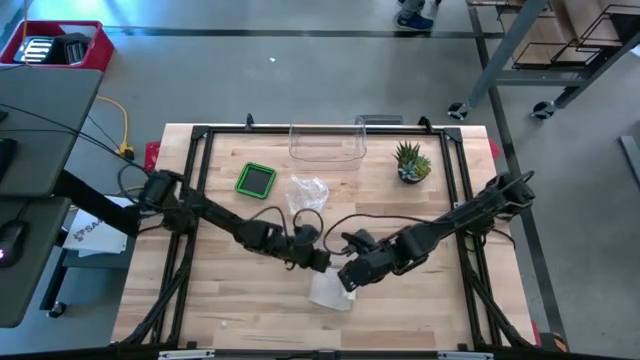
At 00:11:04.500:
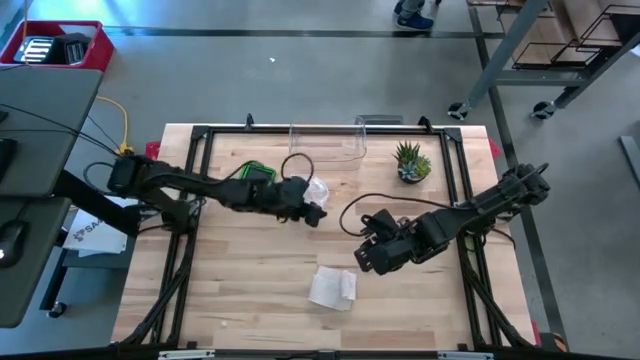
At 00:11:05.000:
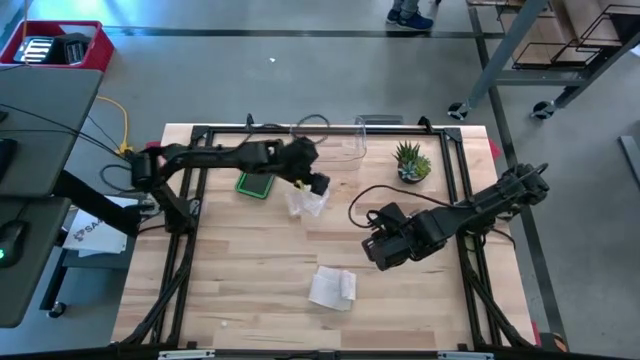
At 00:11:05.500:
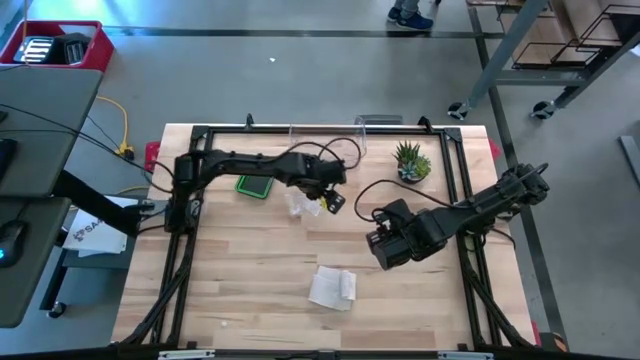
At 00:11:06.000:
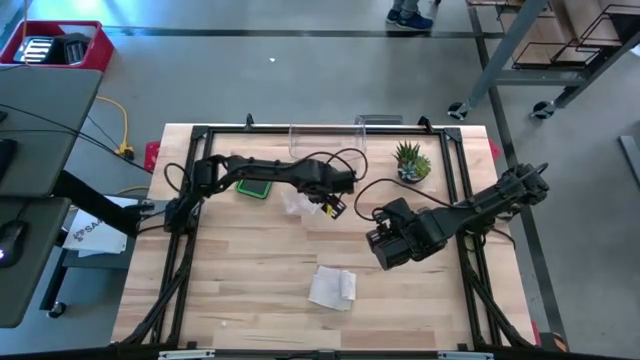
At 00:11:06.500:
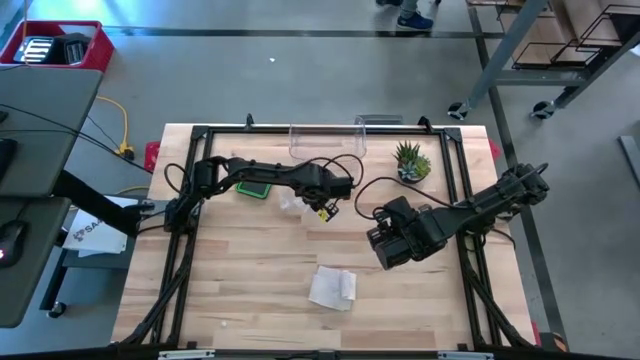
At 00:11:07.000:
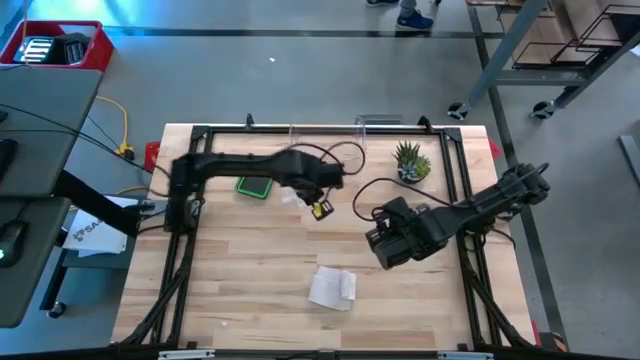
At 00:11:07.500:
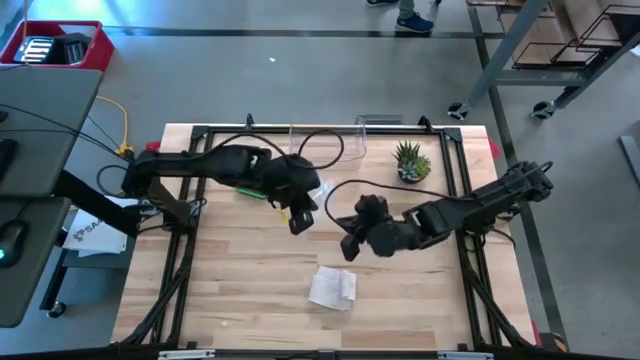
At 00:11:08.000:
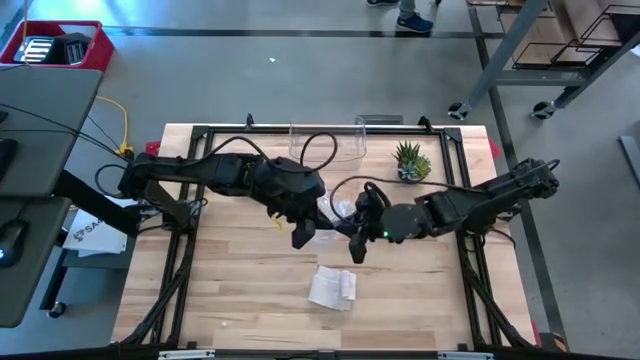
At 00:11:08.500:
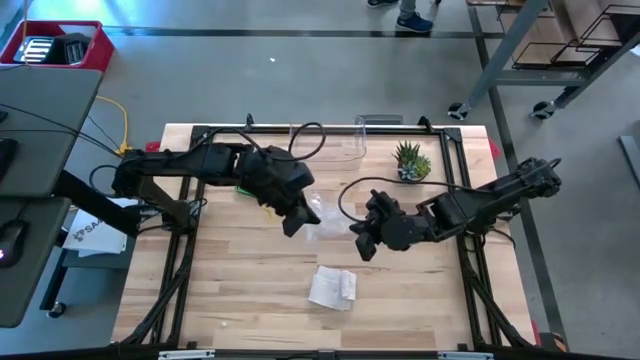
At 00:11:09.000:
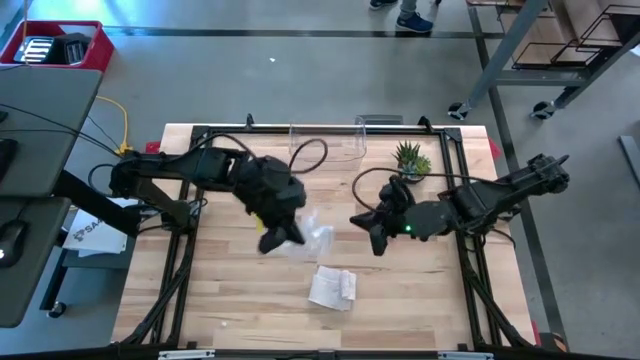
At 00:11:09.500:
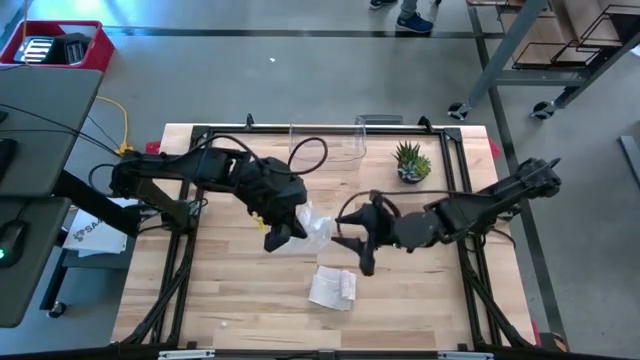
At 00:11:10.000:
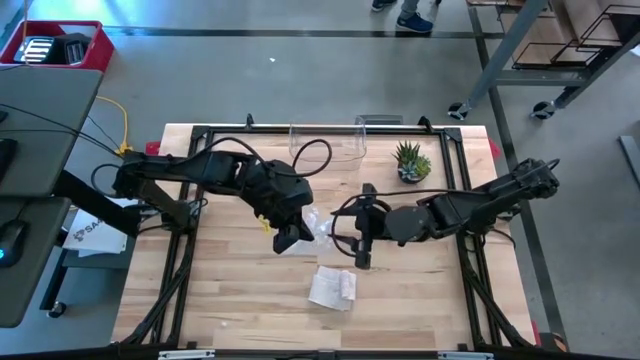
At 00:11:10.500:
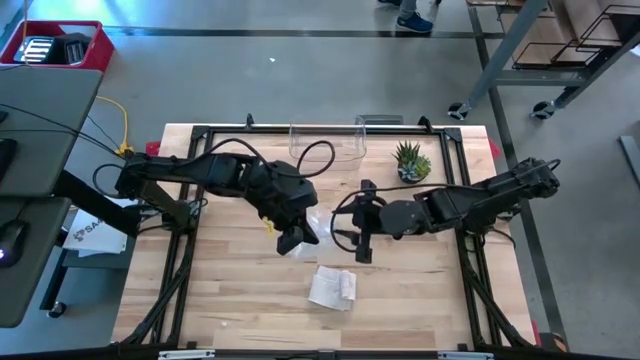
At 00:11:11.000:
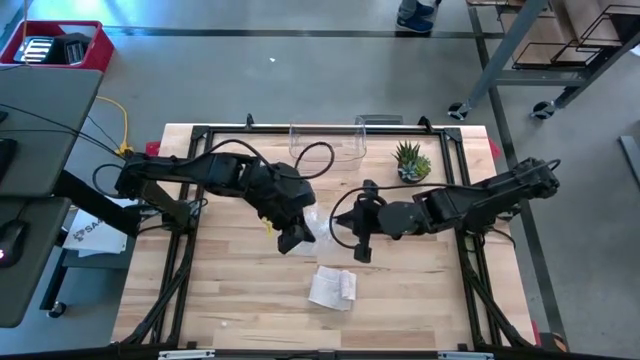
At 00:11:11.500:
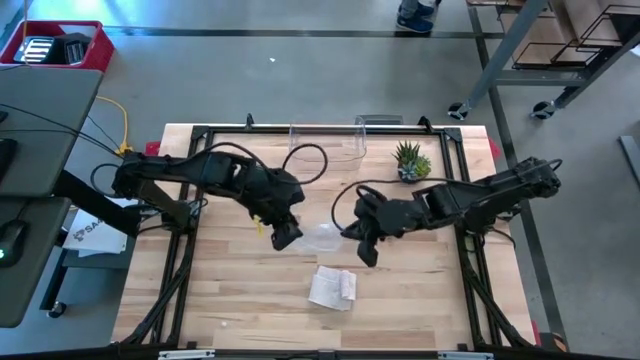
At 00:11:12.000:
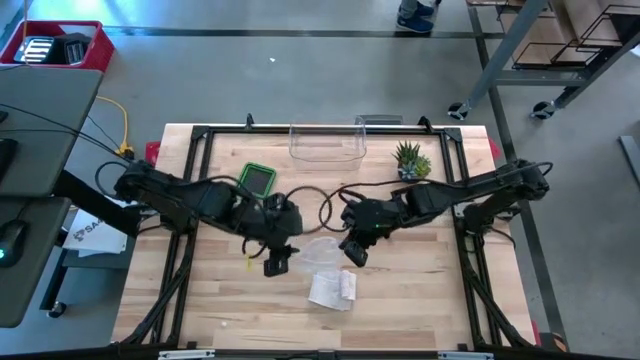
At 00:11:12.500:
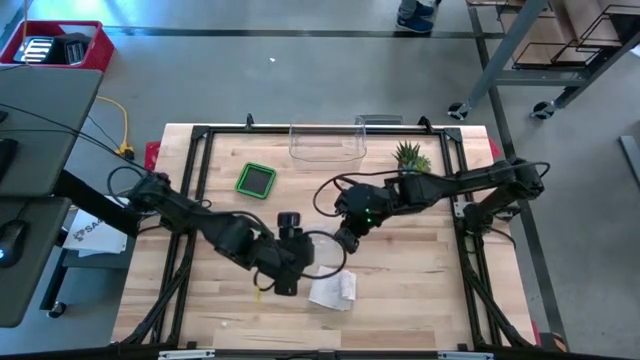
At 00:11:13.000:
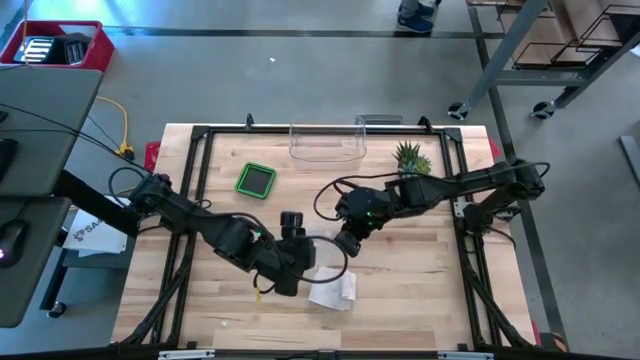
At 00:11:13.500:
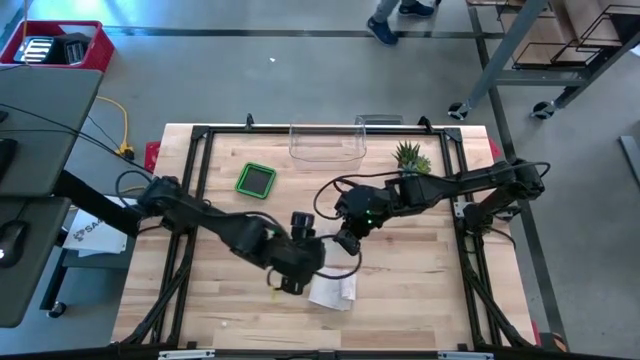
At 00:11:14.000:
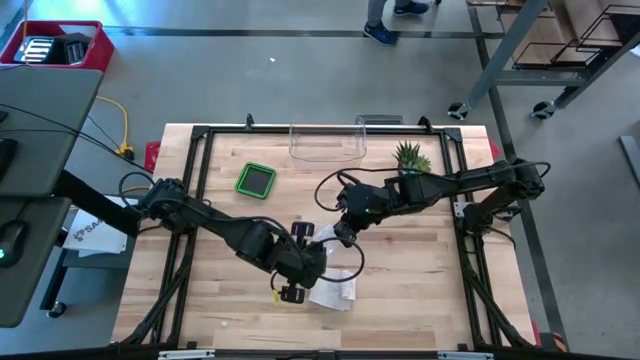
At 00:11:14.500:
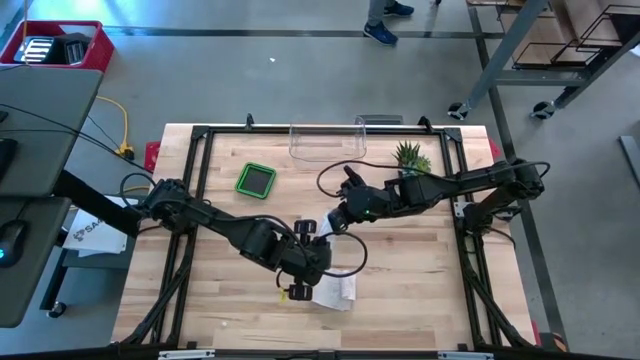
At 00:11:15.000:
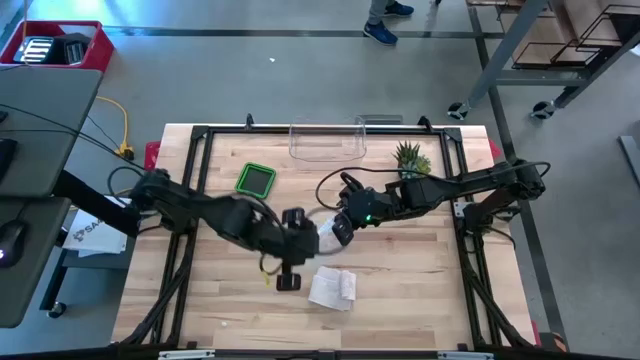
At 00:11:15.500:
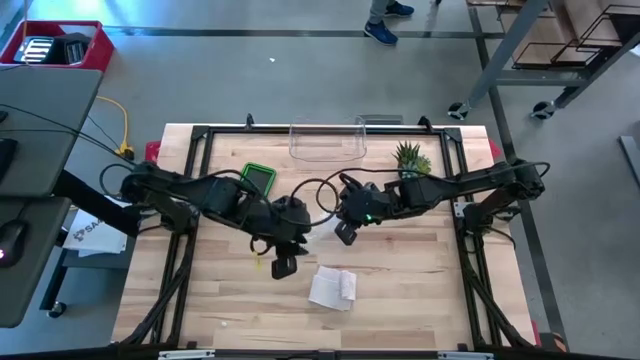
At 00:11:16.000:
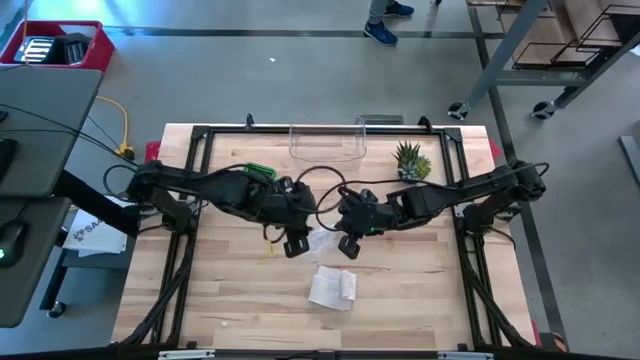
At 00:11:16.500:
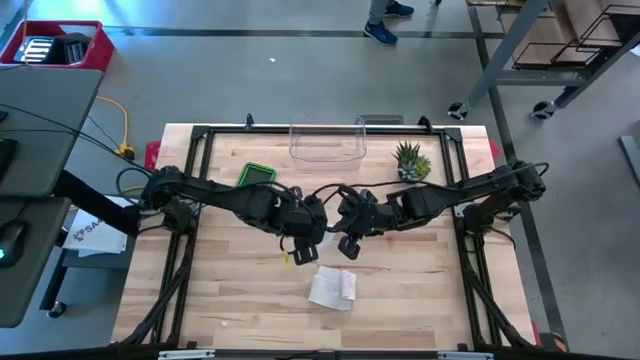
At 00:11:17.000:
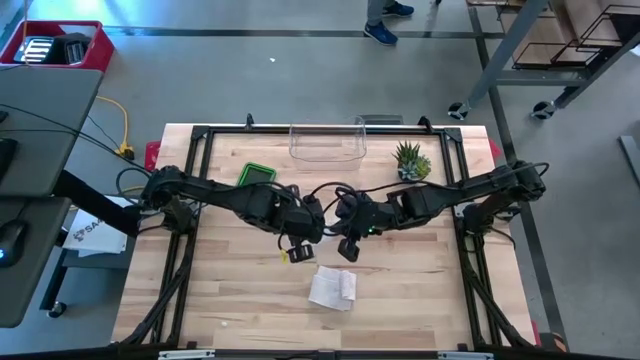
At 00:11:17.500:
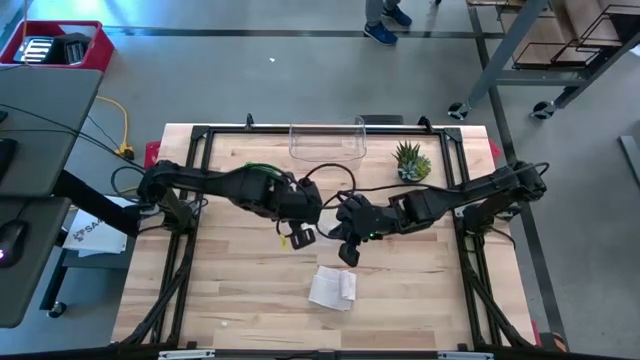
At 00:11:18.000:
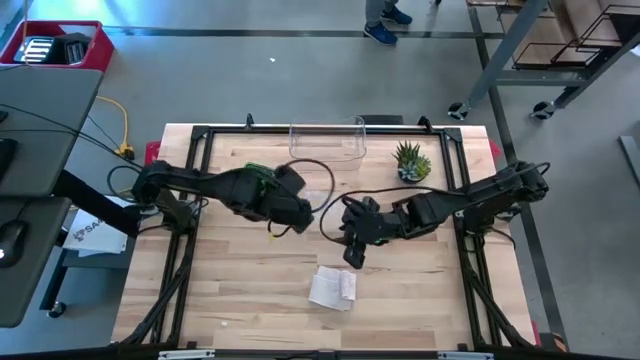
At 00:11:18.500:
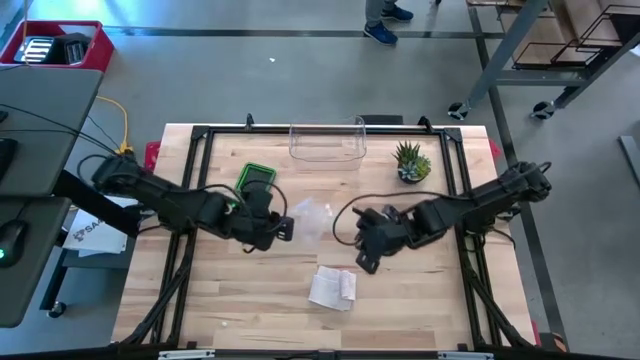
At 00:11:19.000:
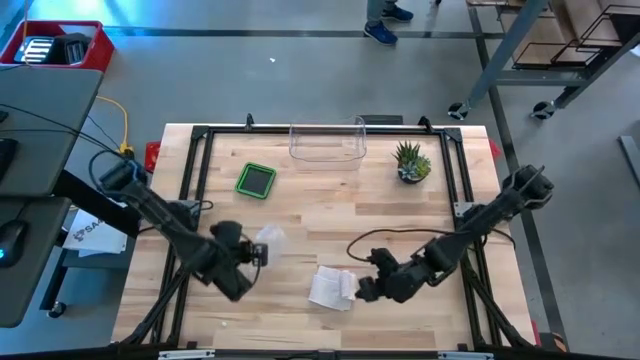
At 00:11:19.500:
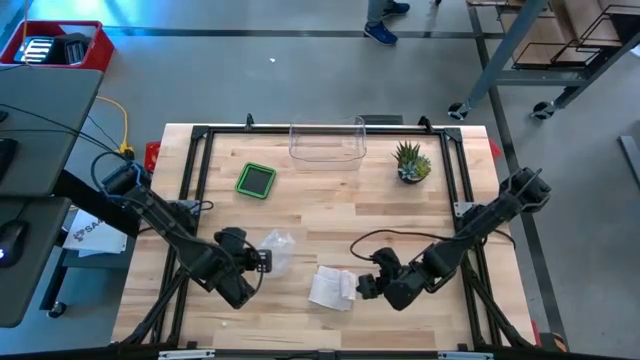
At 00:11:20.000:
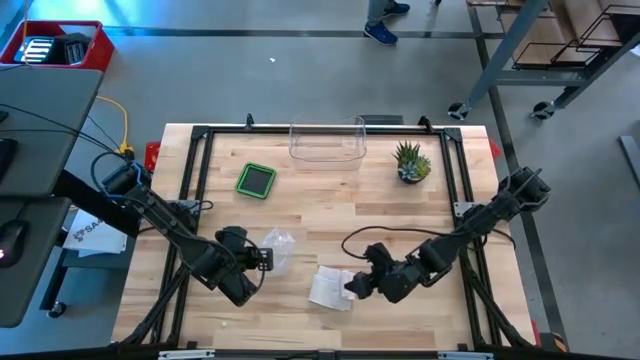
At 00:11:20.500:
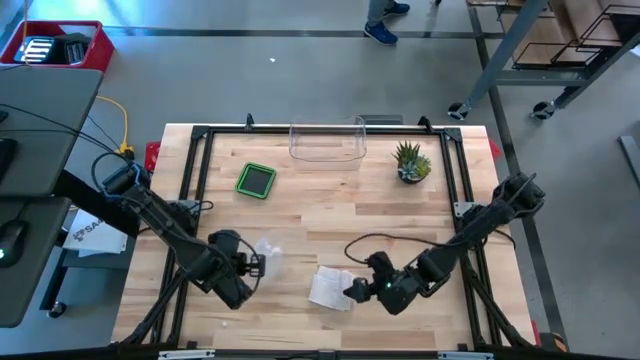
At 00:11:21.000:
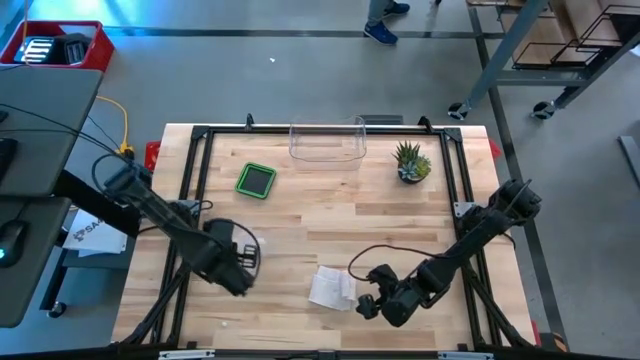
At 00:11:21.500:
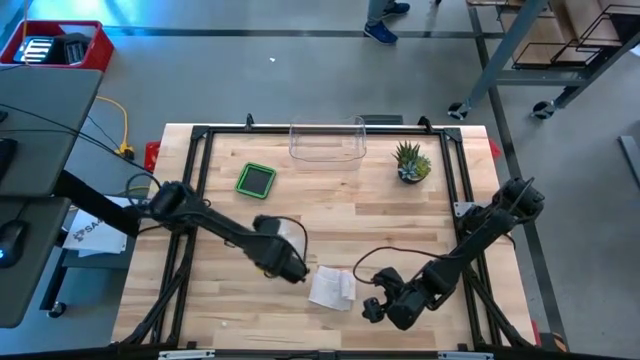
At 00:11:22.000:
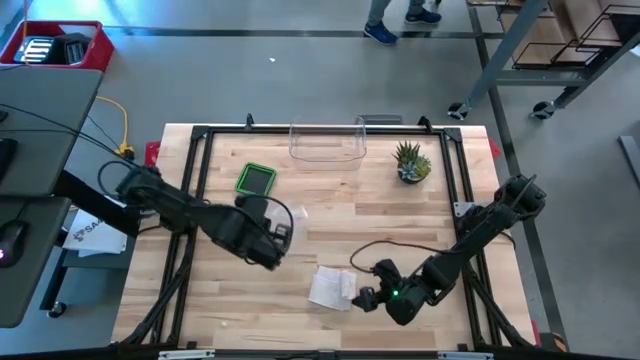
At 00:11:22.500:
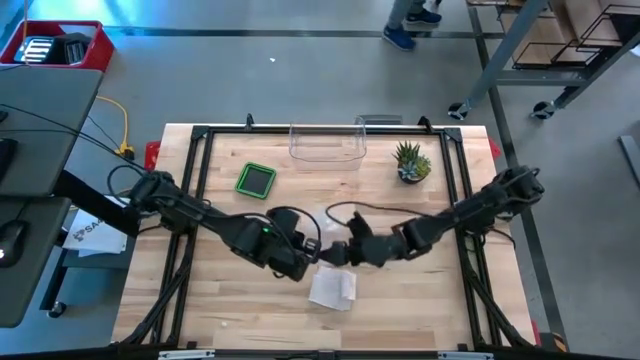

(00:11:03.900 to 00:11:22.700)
Task: Roll bandage
Put the rolled bandage into the transparent zip bag

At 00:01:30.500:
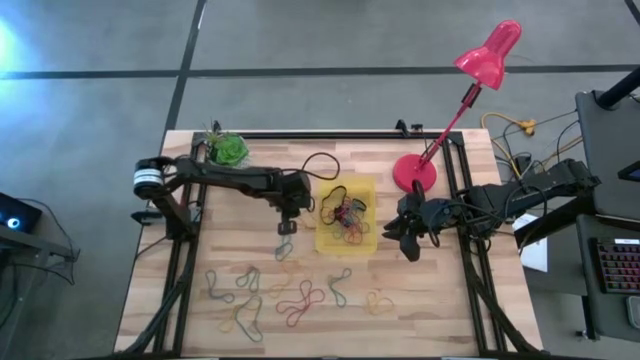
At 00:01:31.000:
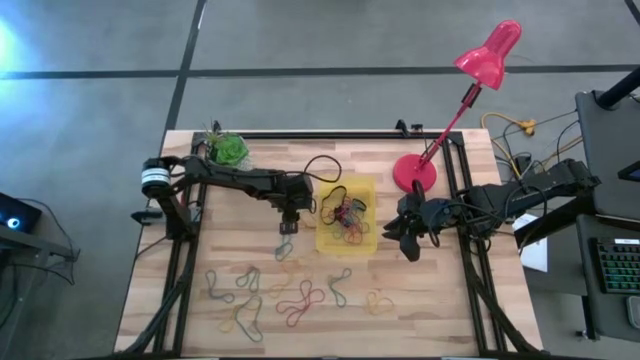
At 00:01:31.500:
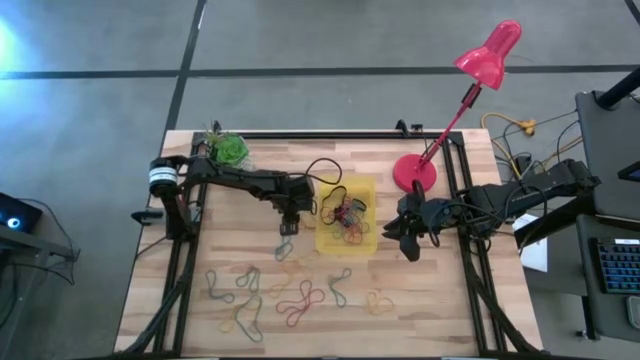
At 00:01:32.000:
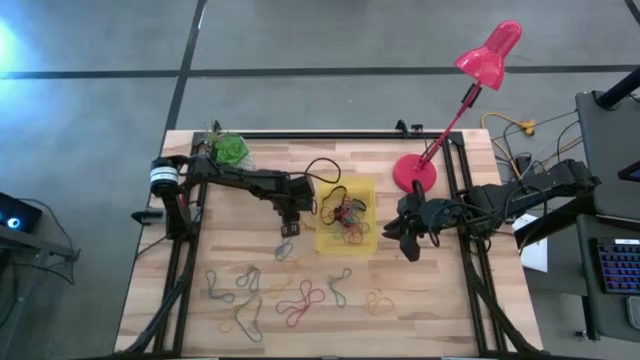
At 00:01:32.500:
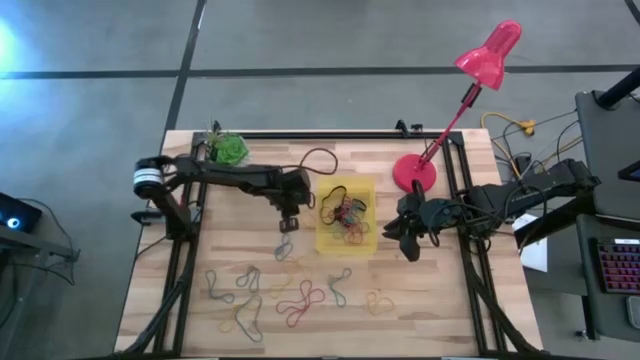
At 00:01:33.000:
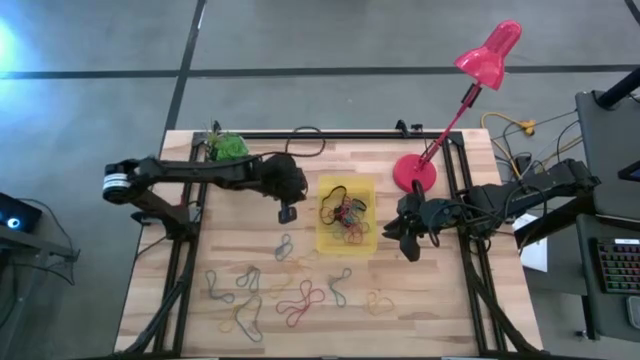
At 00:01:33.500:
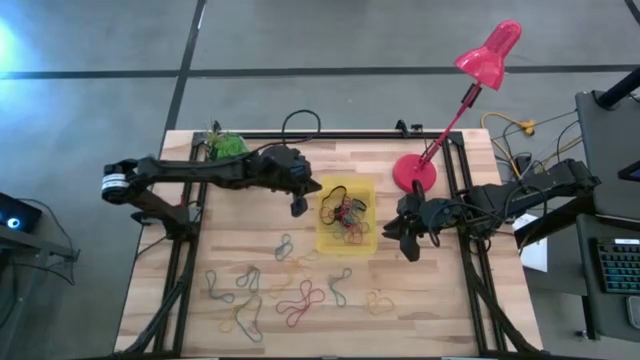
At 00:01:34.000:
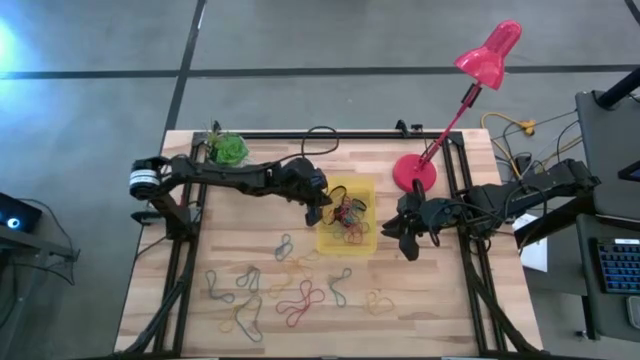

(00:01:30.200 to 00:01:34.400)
Task: Pick and place rubber bands into bin
Put the yellow rubber band into the bin
